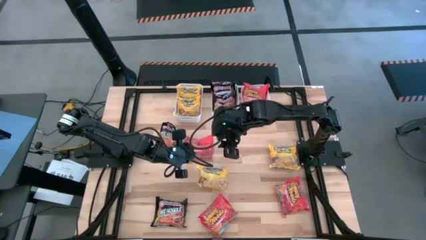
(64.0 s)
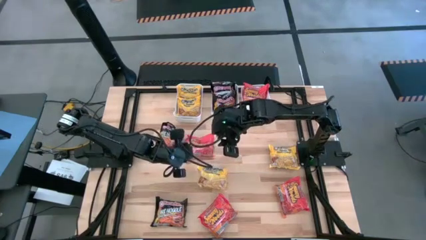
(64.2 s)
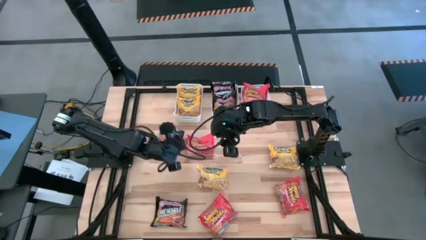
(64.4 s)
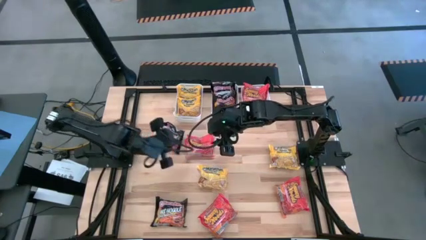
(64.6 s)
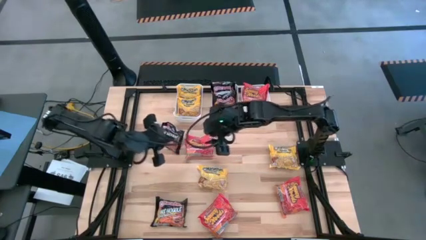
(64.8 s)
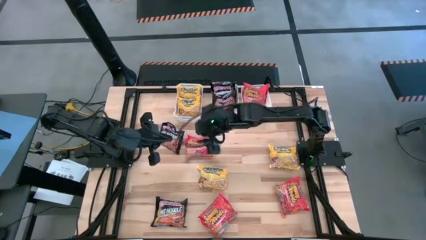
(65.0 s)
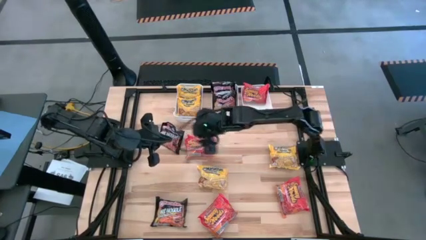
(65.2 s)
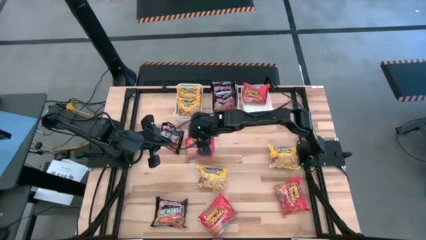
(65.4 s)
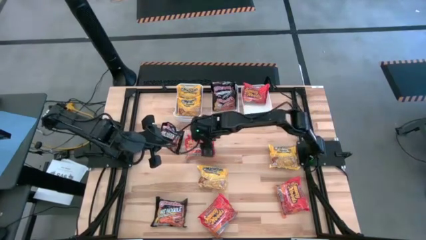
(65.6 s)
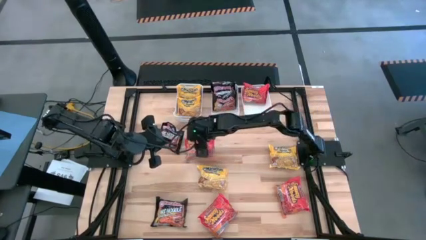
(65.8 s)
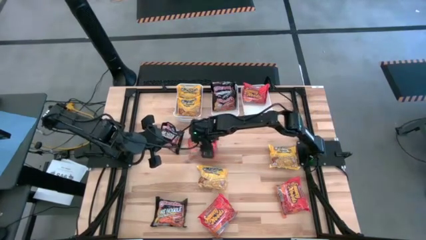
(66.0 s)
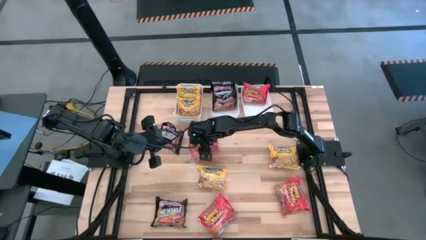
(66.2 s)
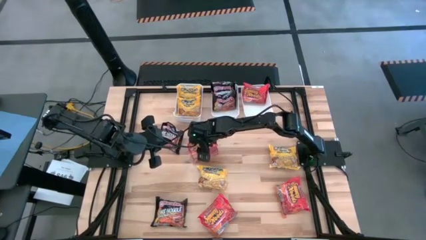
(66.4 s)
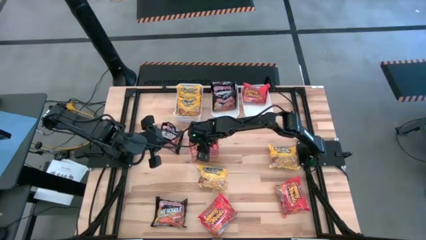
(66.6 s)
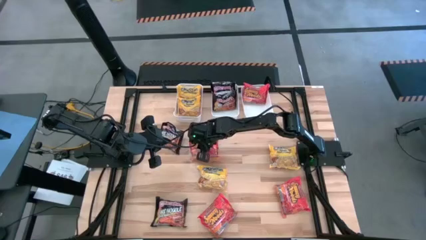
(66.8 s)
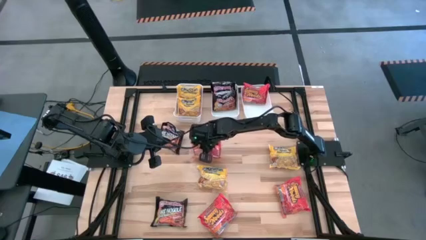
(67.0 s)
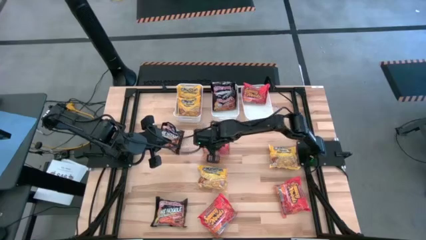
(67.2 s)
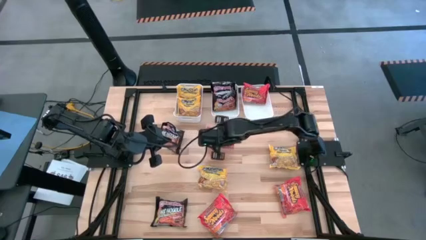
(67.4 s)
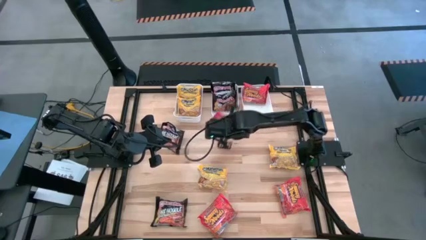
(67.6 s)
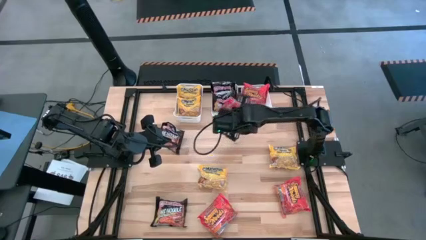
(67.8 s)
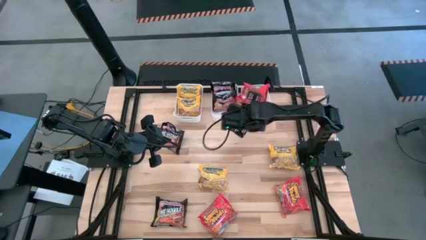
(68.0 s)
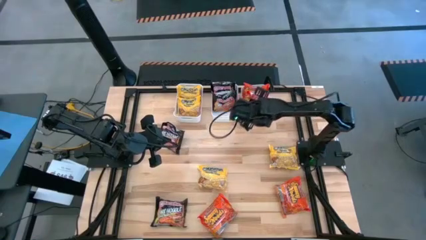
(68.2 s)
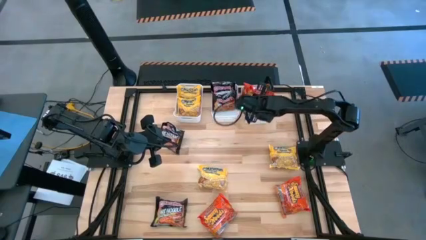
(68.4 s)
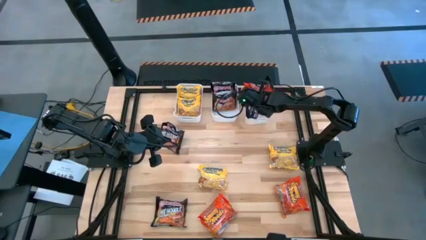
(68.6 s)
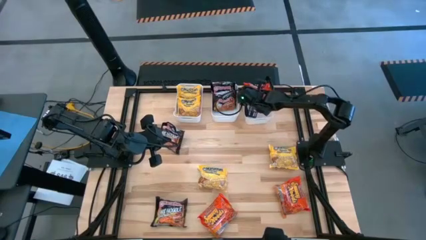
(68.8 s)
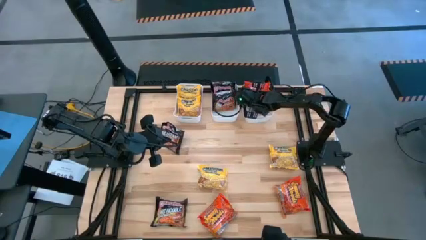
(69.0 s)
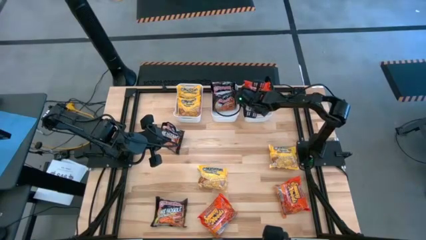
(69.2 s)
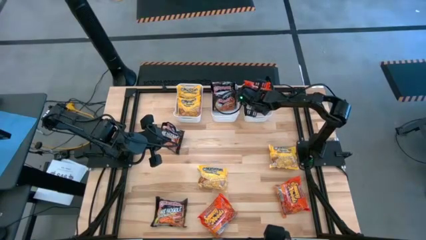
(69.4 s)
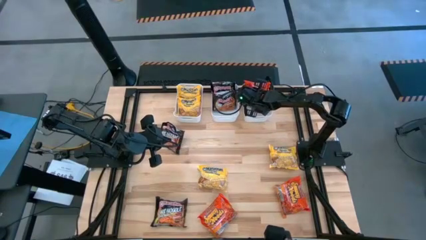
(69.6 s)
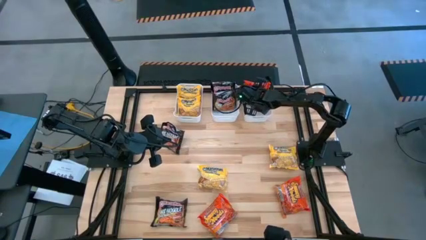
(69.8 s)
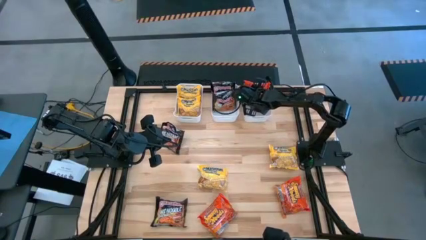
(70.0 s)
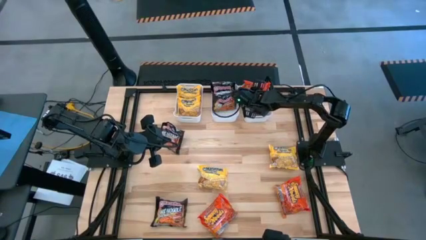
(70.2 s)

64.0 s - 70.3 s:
Task: Sort Maruchan noodles
Put the orange noodle pack into the right white bin

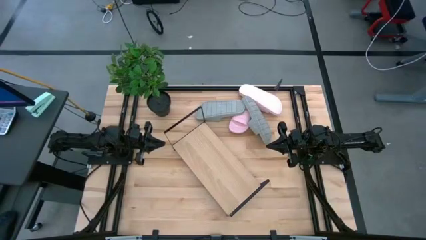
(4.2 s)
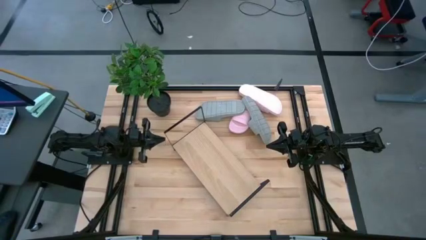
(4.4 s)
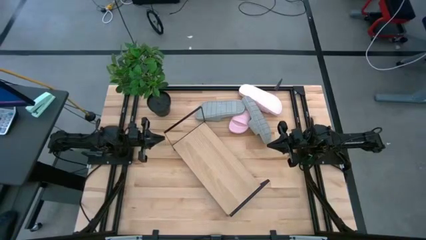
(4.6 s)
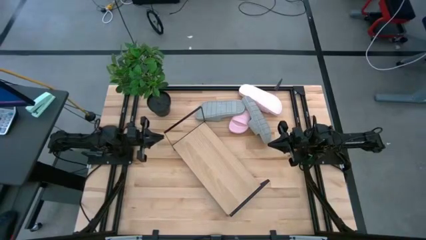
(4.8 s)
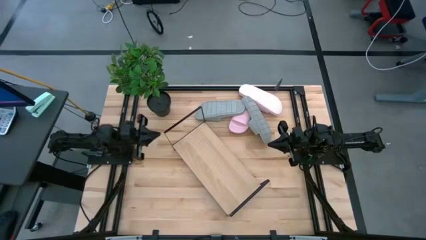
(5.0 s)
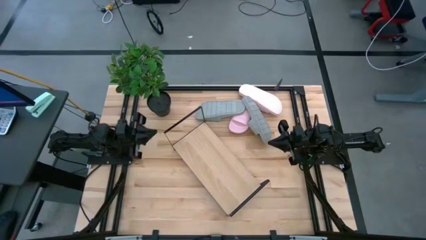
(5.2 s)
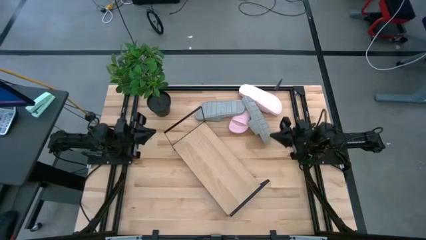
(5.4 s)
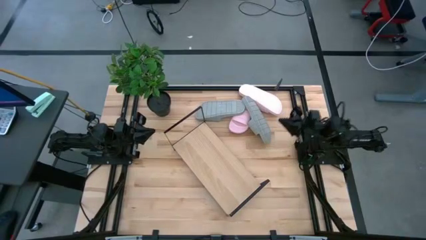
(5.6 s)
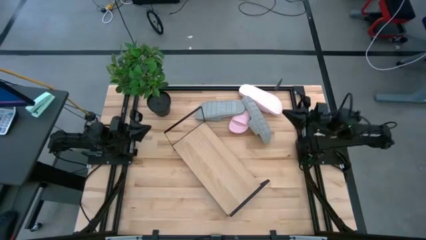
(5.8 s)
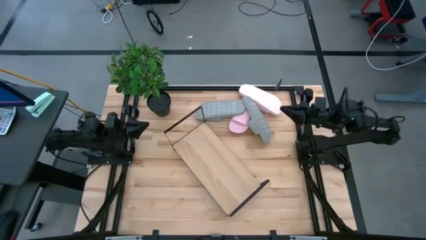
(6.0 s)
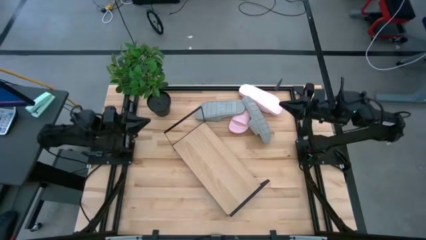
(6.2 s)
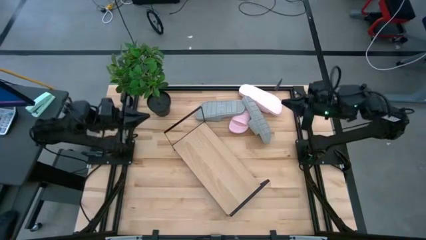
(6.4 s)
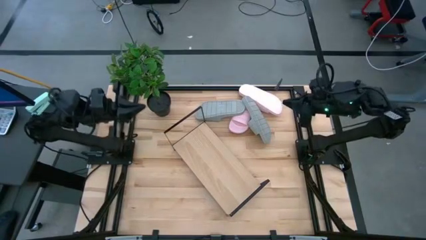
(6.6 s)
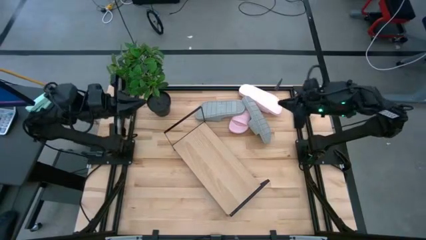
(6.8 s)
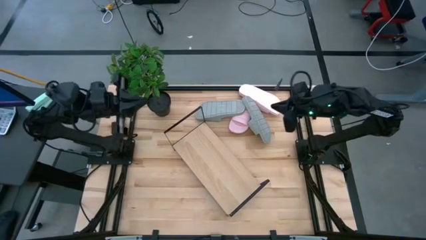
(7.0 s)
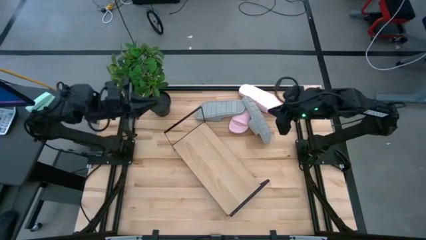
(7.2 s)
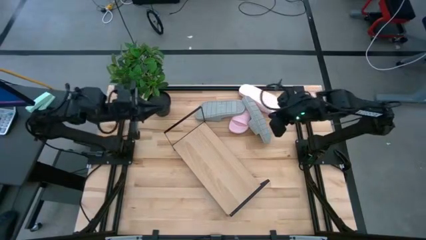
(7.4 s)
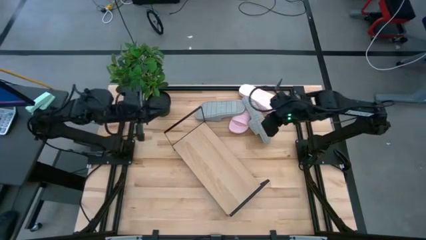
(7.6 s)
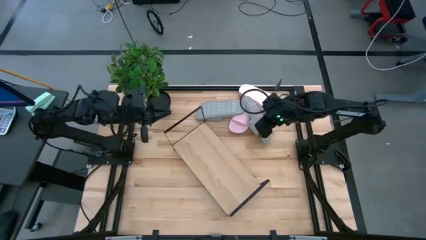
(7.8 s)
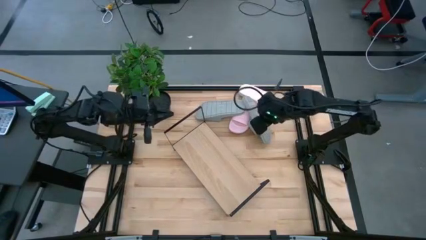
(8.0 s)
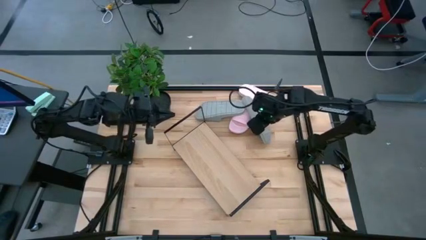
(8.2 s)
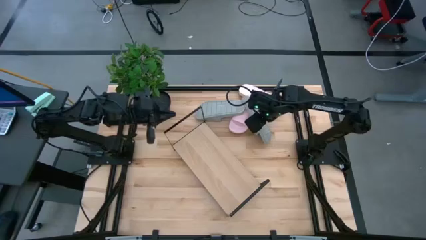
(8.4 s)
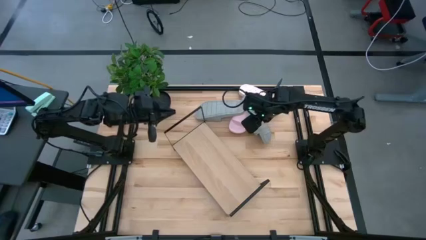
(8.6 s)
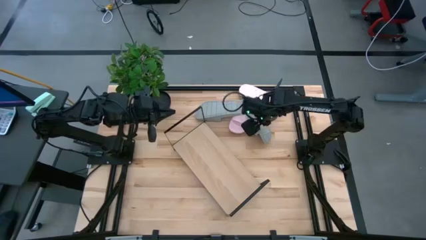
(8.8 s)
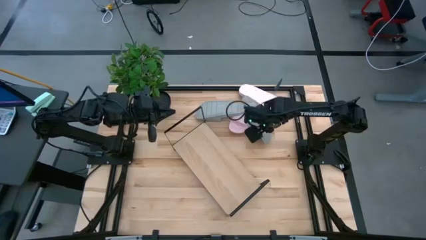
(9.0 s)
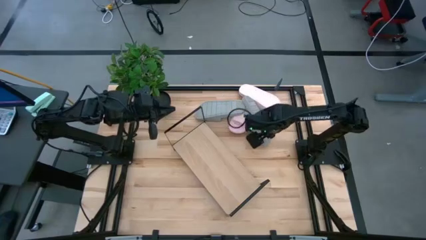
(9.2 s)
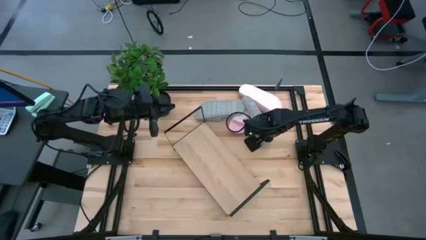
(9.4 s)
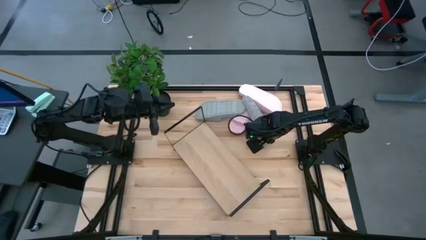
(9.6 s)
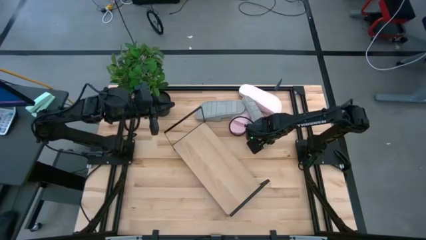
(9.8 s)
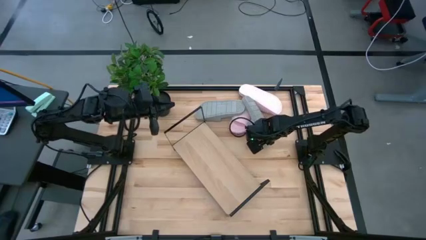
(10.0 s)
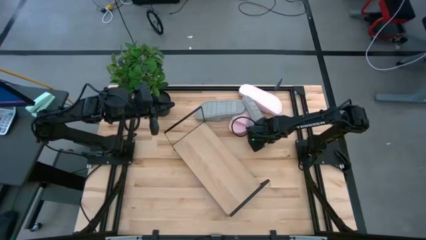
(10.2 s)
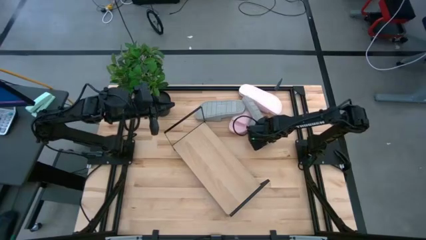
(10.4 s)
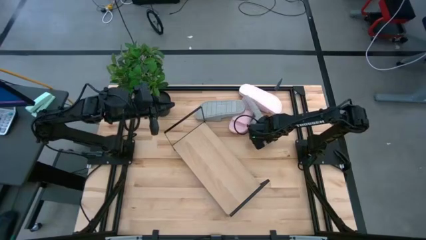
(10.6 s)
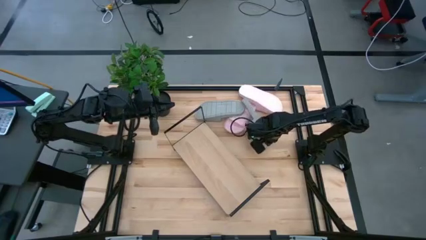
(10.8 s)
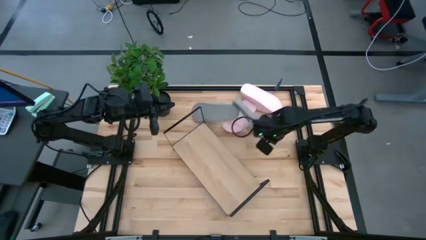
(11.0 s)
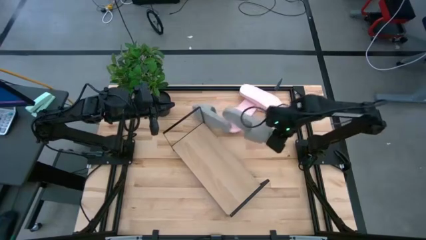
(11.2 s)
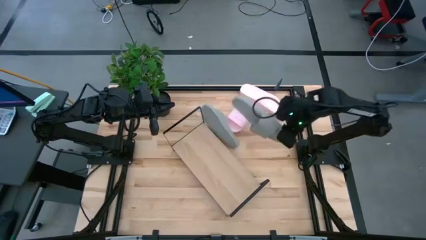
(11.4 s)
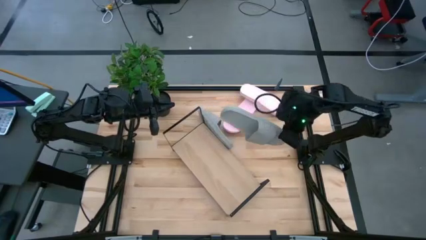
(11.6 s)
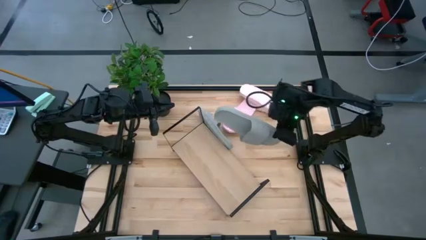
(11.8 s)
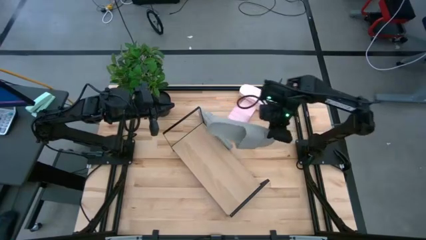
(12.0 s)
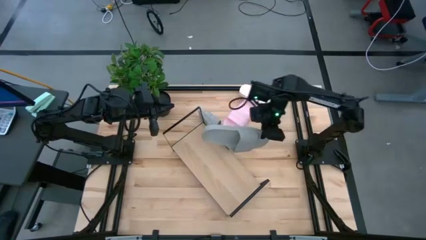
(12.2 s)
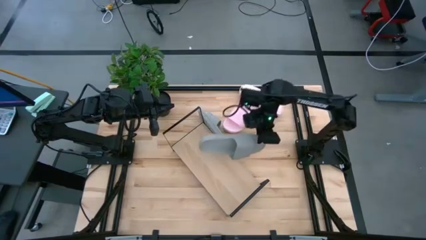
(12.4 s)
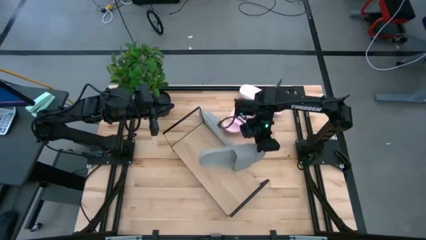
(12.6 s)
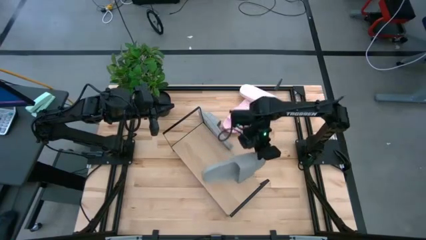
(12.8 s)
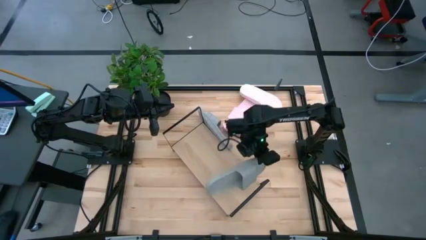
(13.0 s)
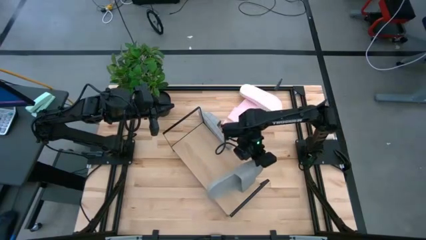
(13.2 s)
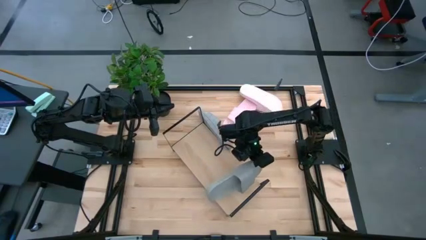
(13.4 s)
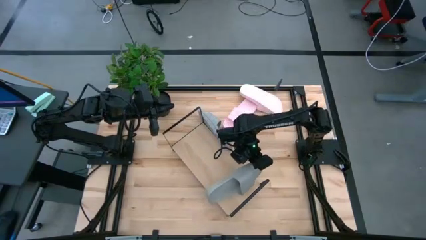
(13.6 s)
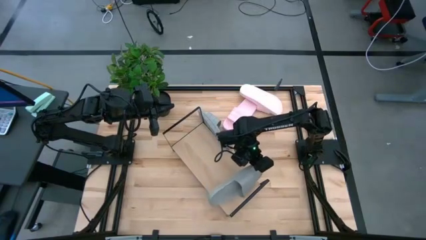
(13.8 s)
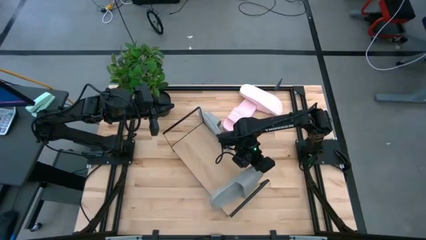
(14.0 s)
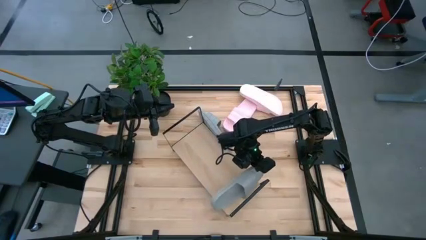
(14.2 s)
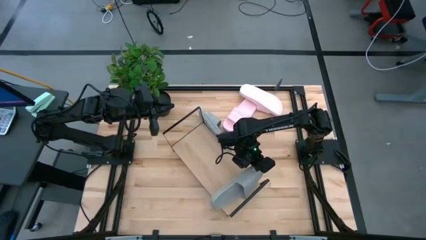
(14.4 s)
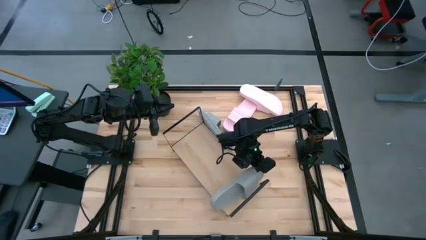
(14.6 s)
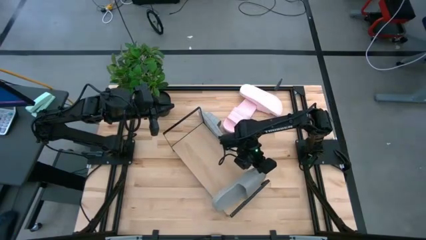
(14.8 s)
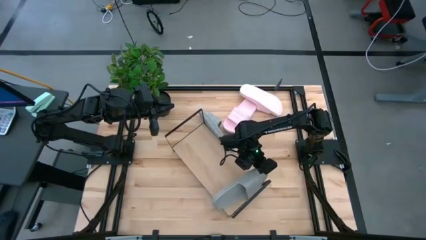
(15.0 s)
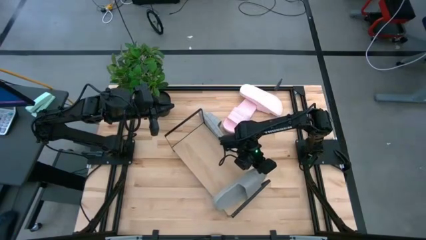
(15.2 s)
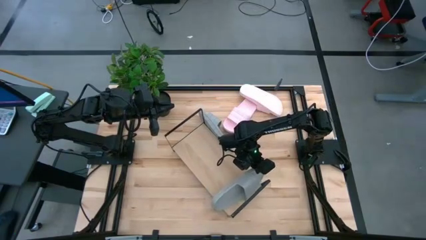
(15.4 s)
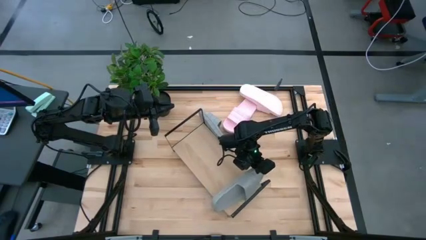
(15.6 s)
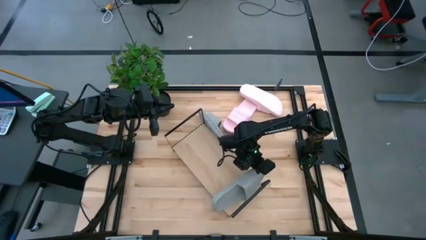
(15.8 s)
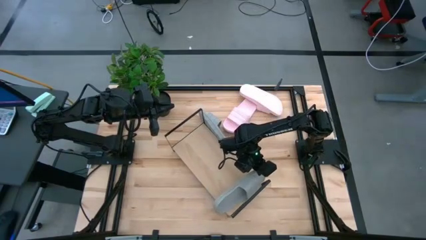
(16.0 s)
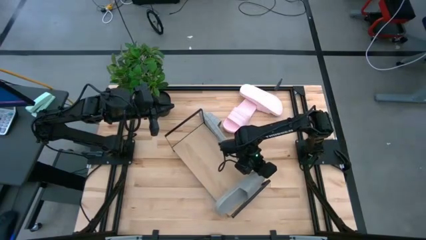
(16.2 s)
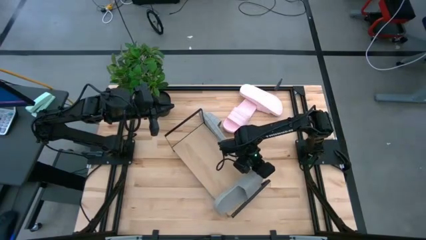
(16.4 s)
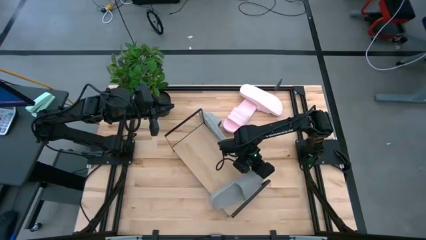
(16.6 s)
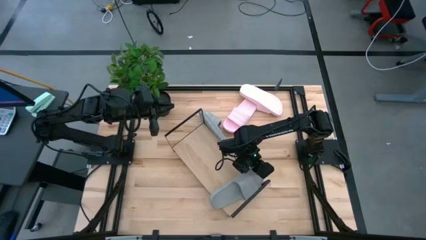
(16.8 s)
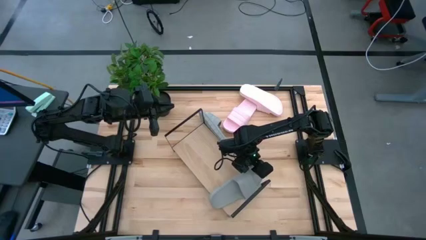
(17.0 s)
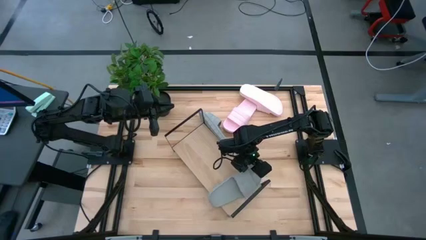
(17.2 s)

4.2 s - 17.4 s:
Task: Pick and place slides into the shelf
Put the right gray slide on the shelf
